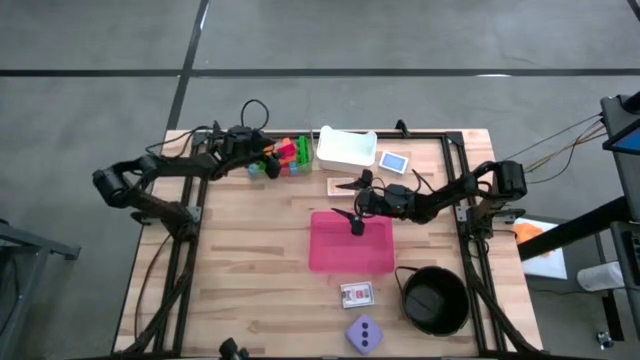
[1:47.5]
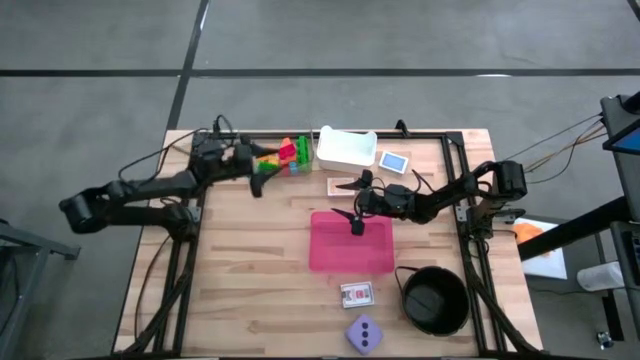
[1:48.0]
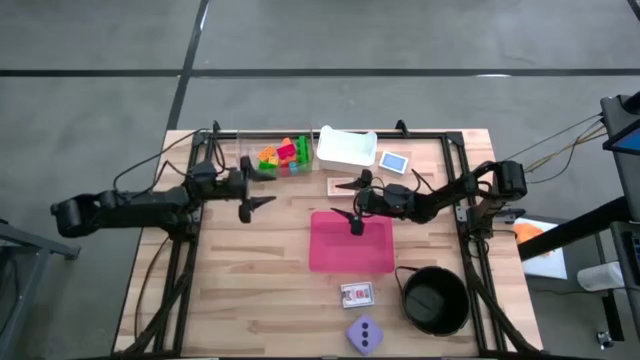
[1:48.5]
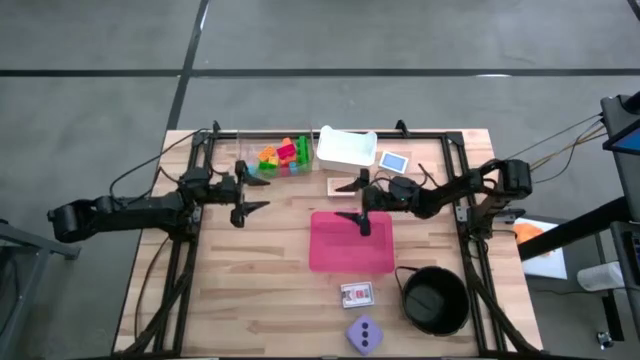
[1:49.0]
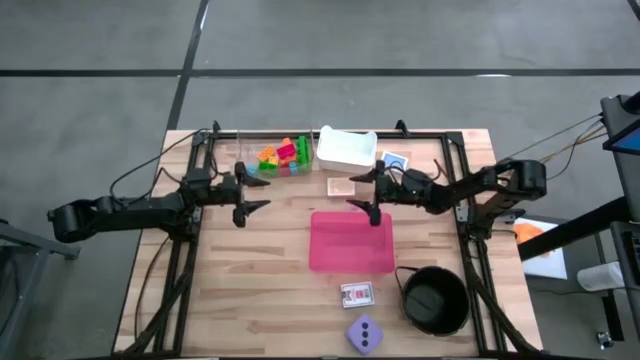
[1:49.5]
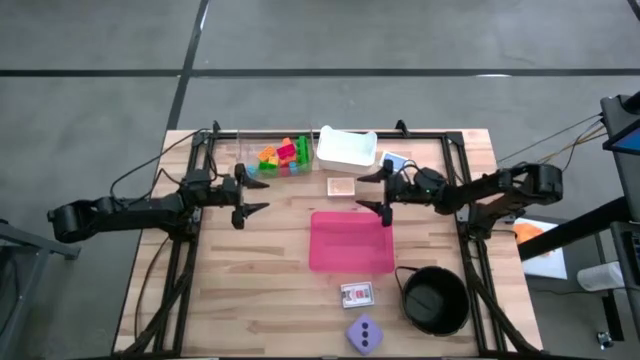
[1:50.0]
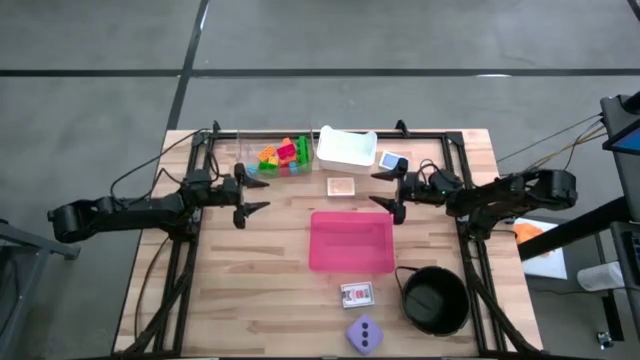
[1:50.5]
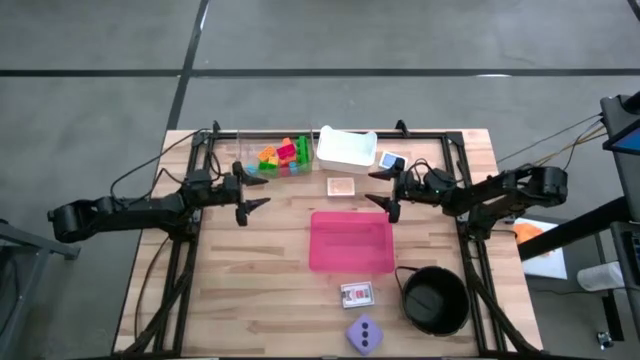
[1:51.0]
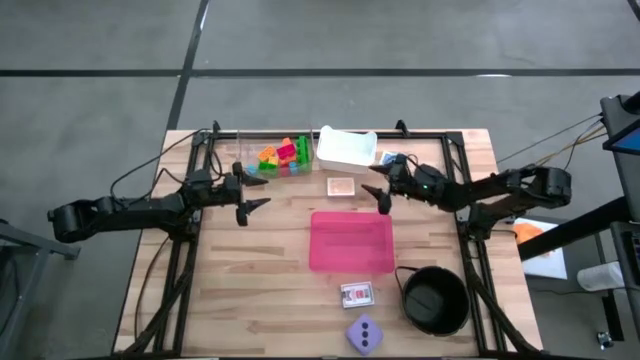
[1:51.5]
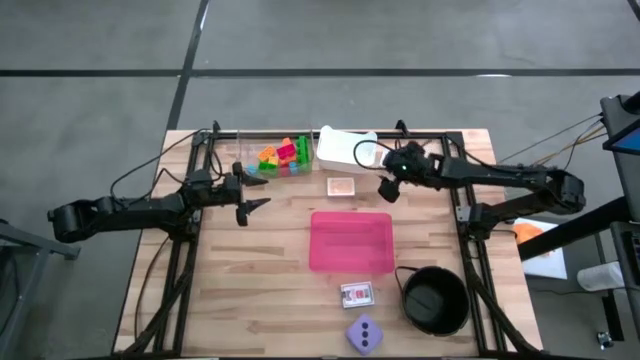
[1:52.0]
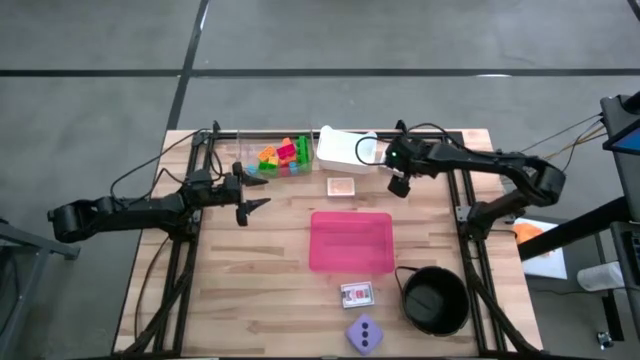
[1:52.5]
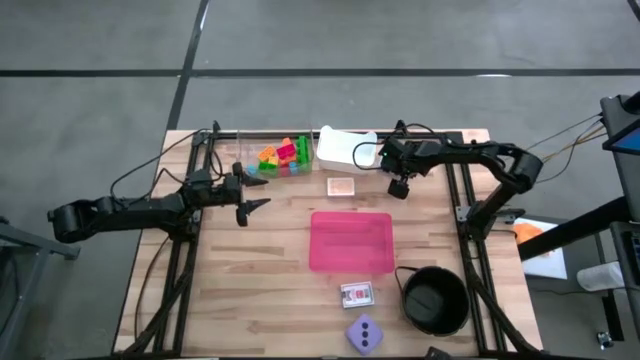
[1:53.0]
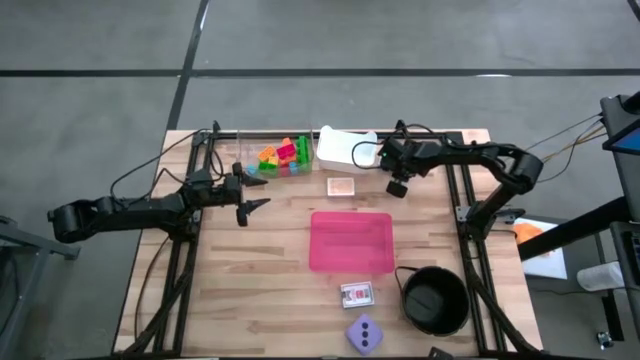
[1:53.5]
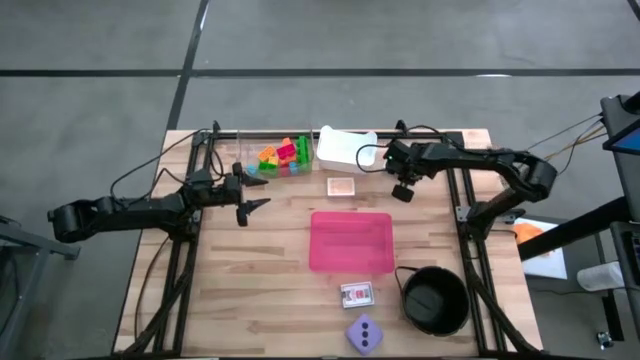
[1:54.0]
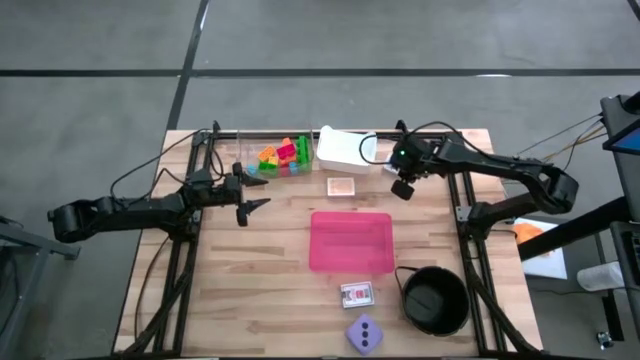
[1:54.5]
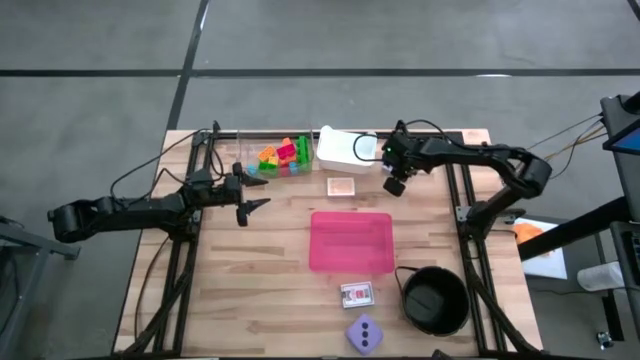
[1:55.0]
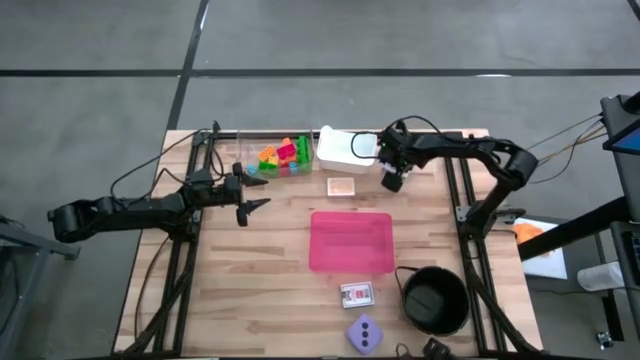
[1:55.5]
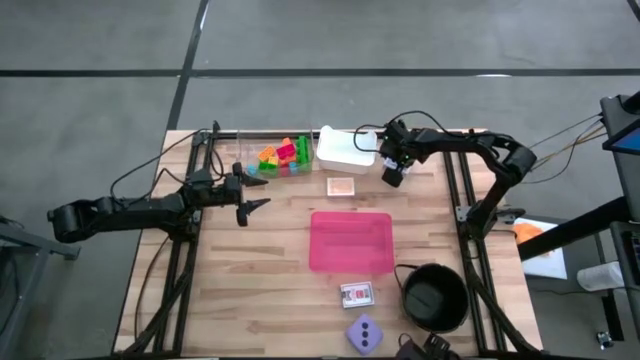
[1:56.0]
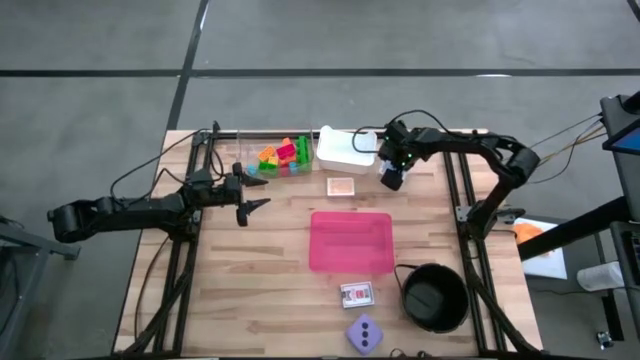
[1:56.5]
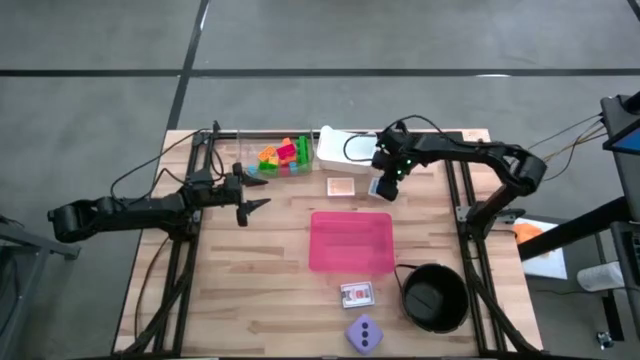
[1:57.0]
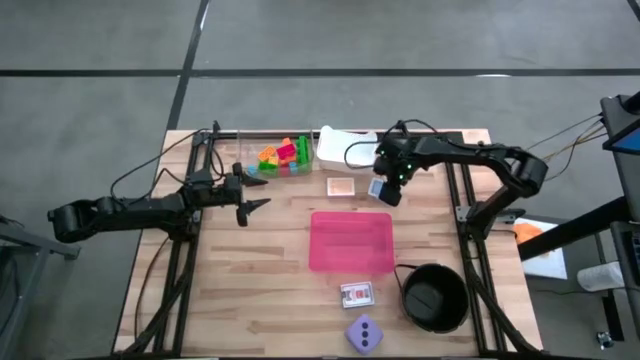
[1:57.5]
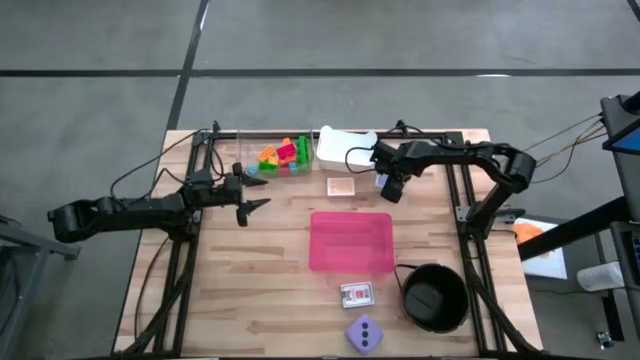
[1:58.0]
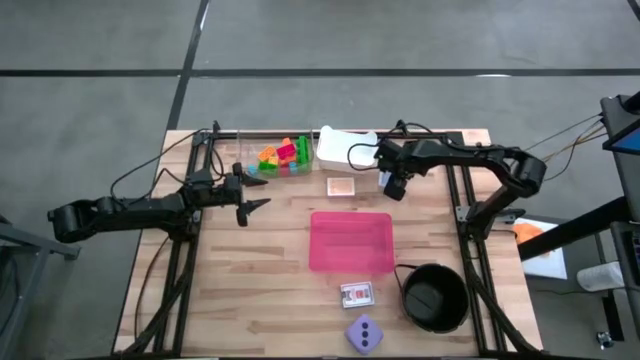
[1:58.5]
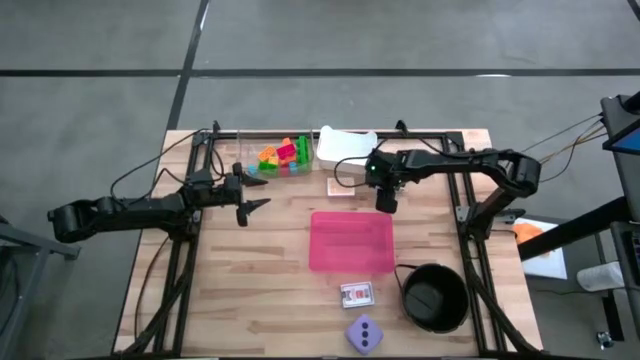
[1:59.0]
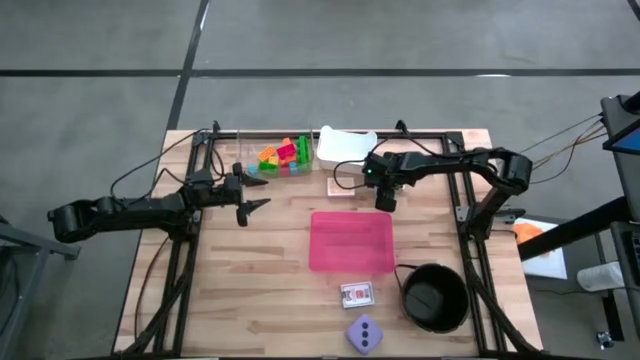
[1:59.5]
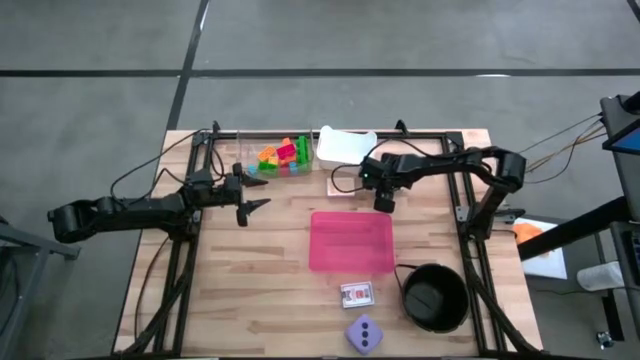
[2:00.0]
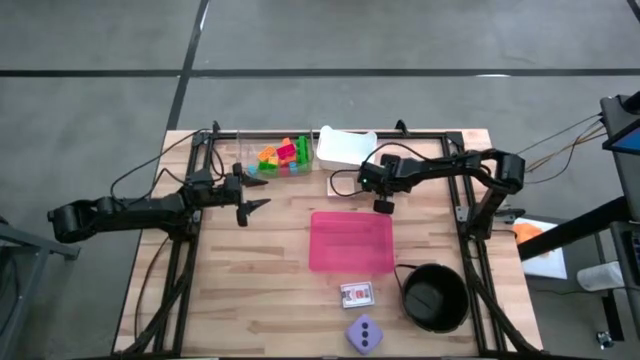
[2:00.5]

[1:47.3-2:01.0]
Task: Pick & Place Toys
Put the blue playing card into the white bin

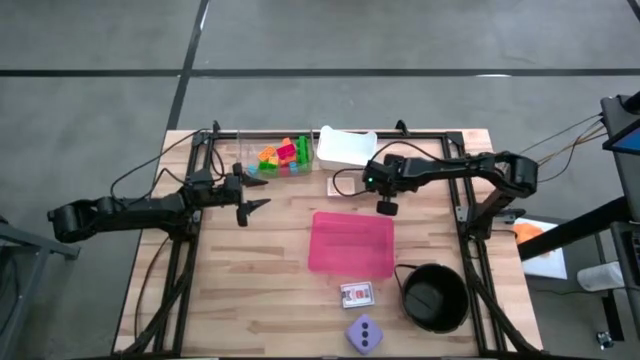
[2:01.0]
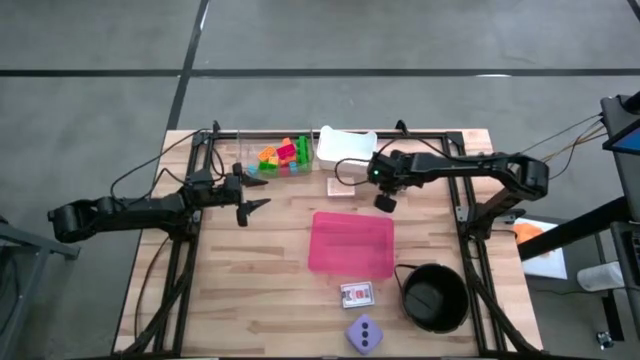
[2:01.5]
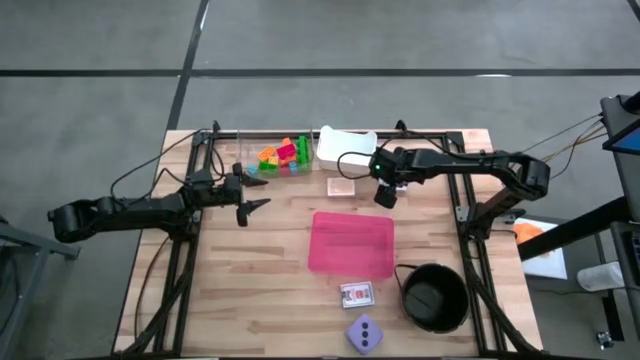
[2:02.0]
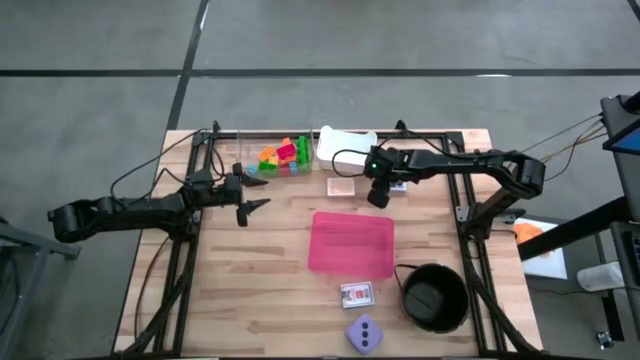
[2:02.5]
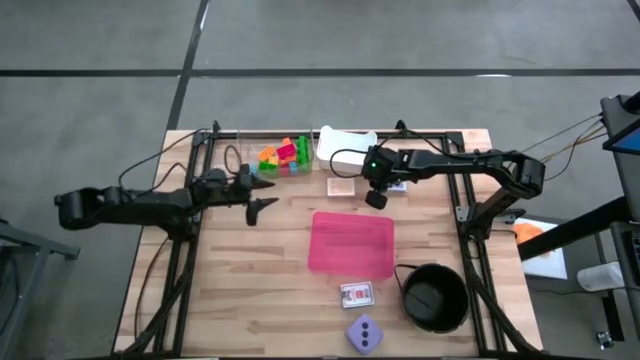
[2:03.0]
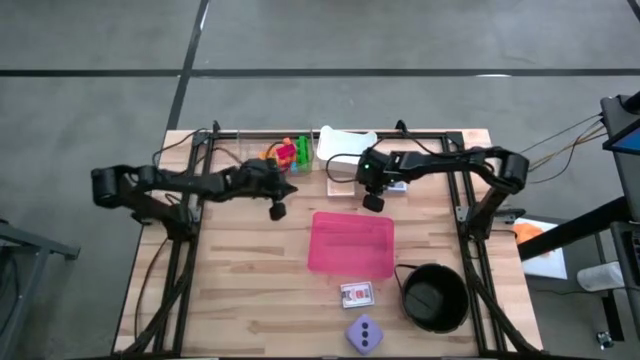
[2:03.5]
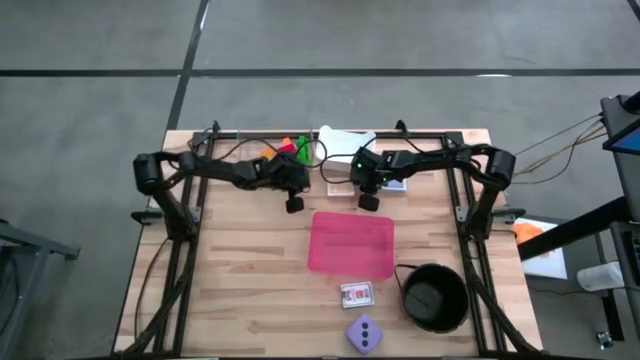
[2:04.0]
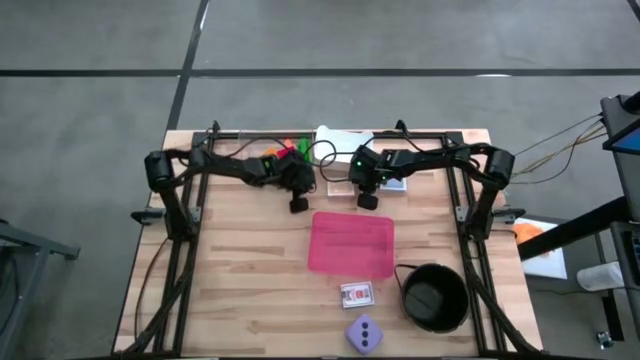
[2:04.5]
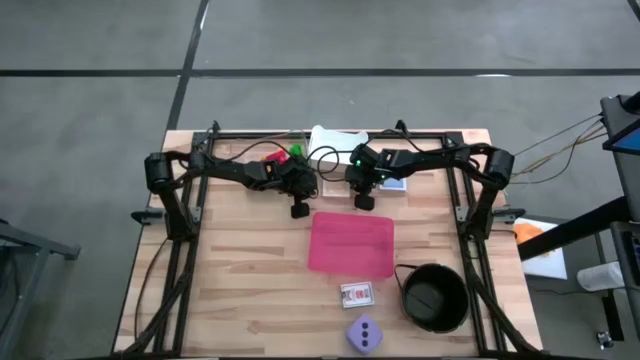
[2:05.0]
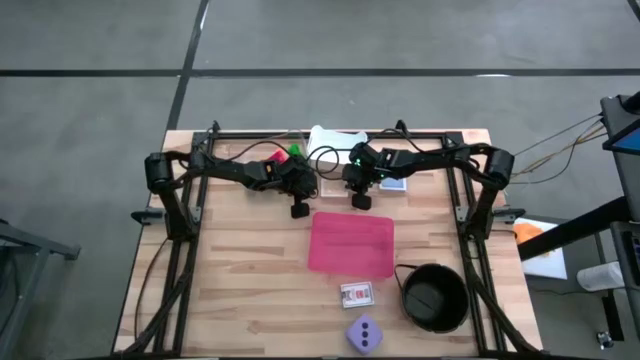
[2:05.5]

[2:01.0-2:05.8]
Adjust the yellow playing card

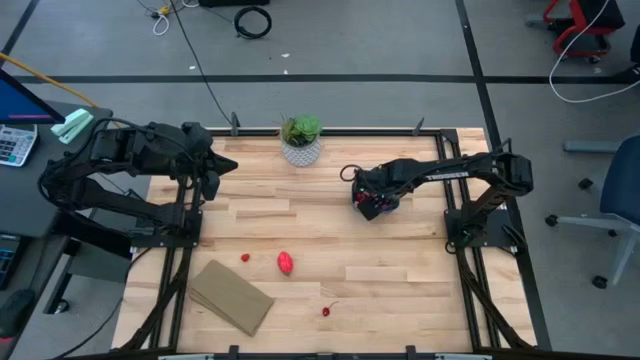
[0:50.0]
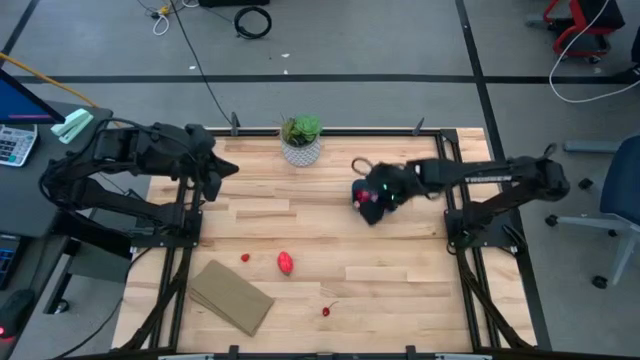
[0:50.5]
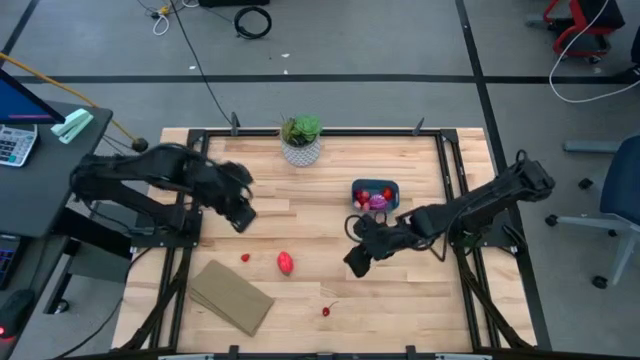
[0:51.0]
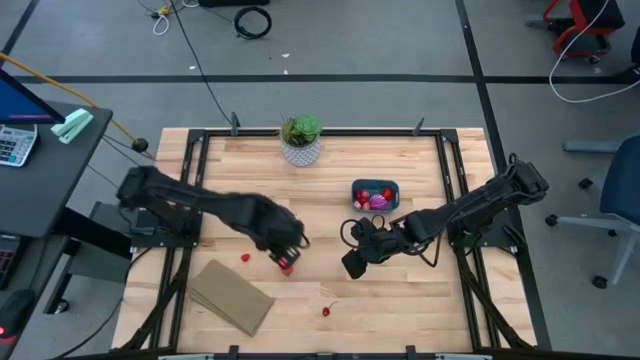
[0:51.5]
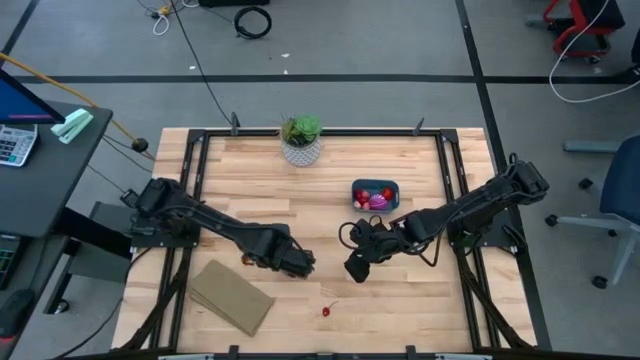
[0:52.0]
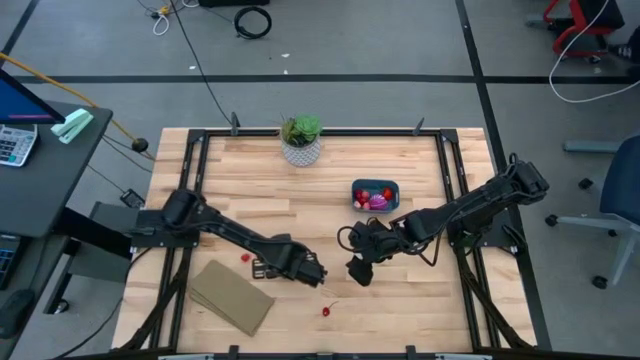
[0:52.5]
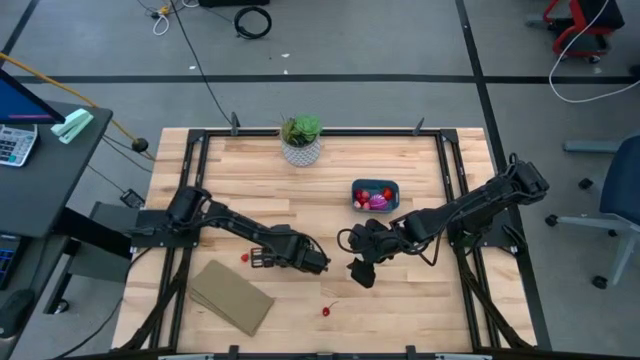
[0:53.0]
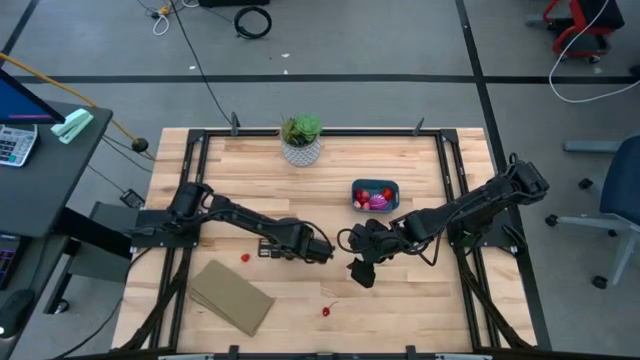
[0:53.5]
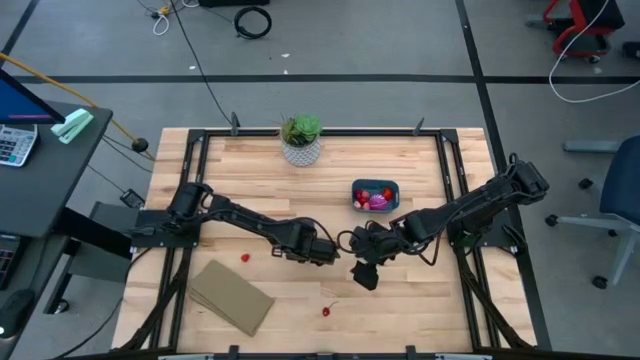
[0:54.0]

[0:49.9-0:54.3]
Task: Pick and placing Produce into tupperware
Put the red dragon fruit into the blue bin
